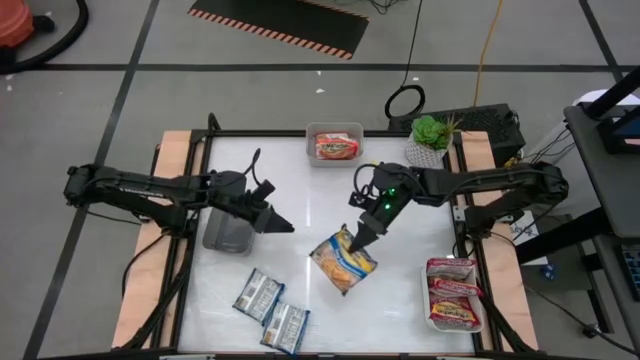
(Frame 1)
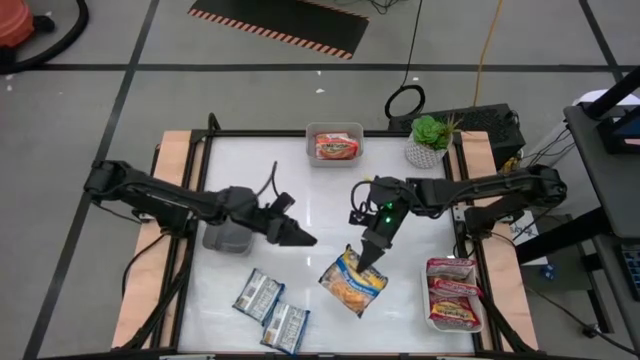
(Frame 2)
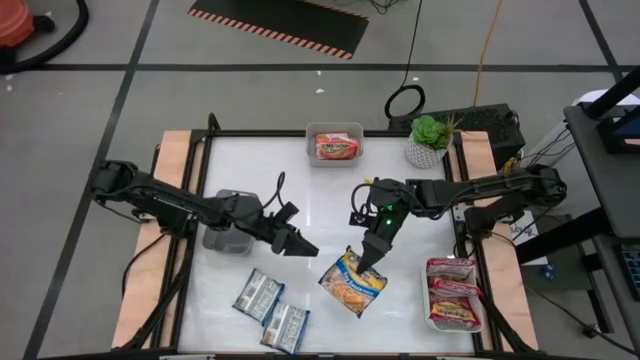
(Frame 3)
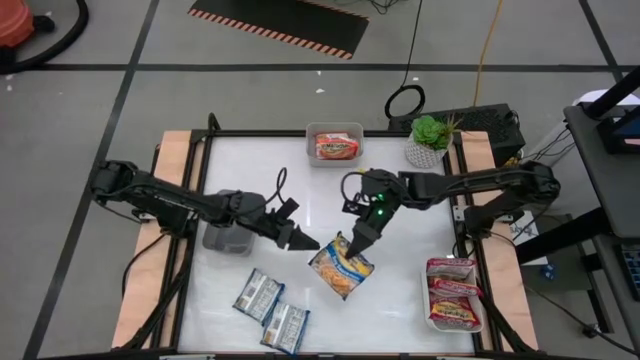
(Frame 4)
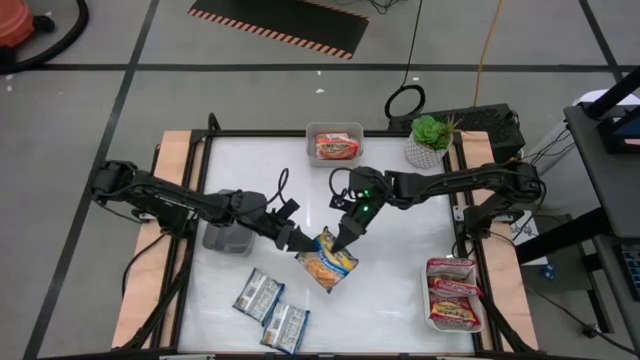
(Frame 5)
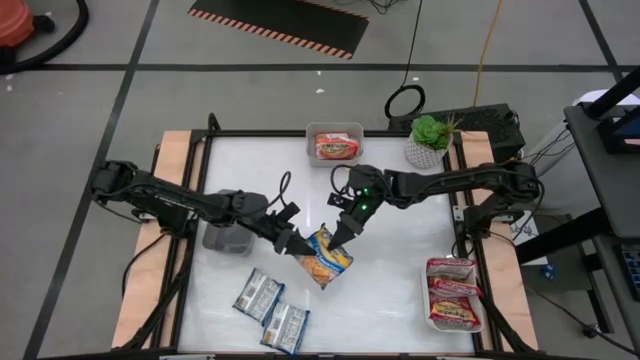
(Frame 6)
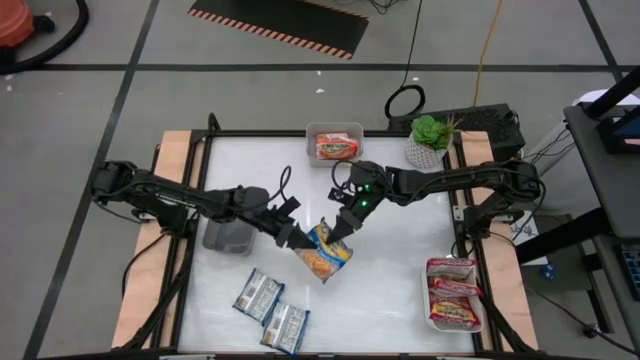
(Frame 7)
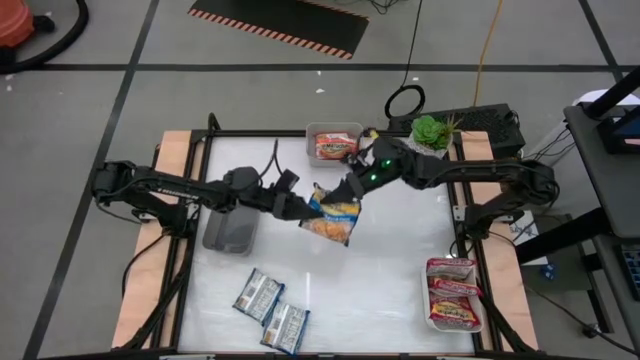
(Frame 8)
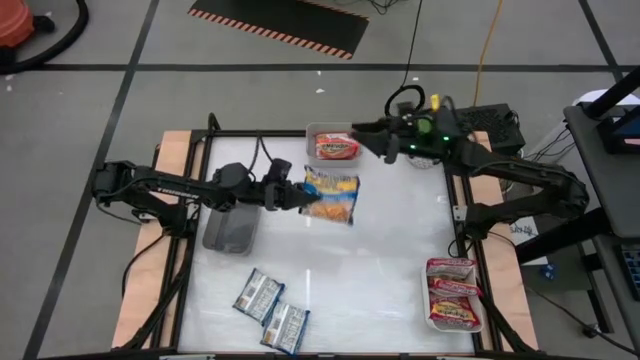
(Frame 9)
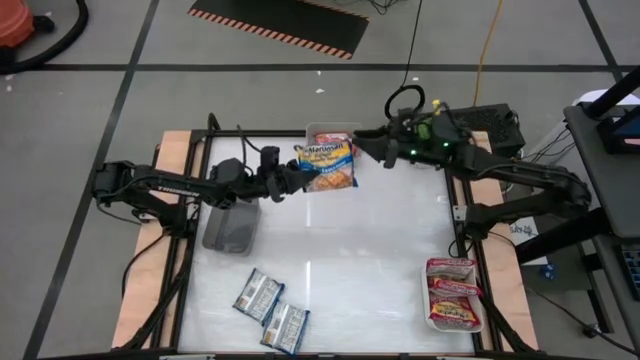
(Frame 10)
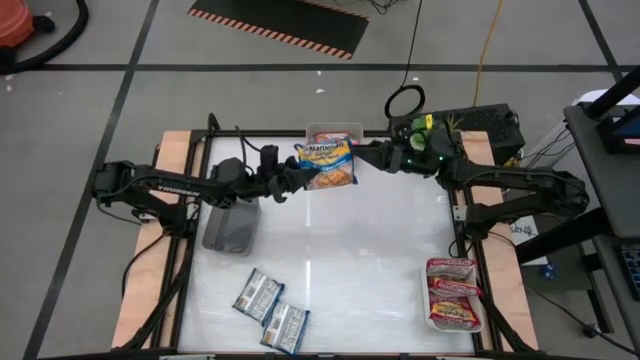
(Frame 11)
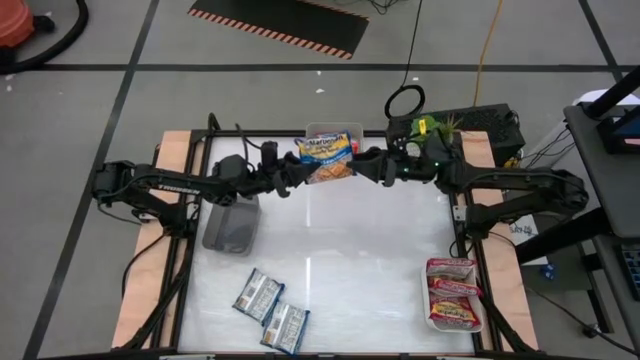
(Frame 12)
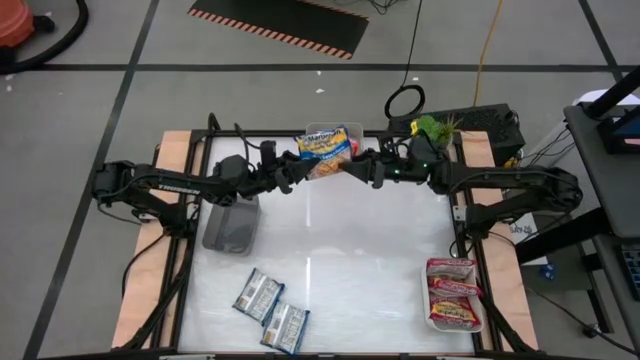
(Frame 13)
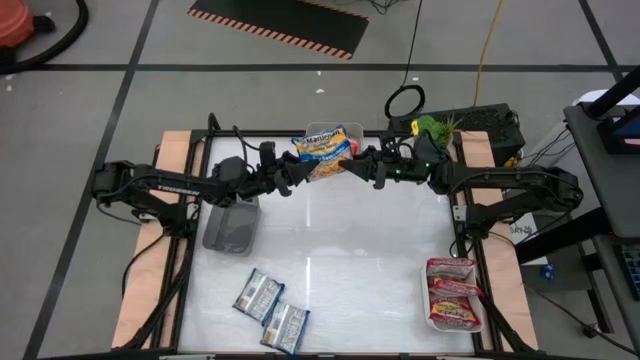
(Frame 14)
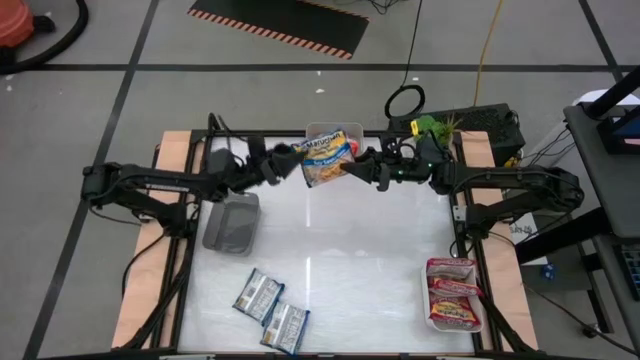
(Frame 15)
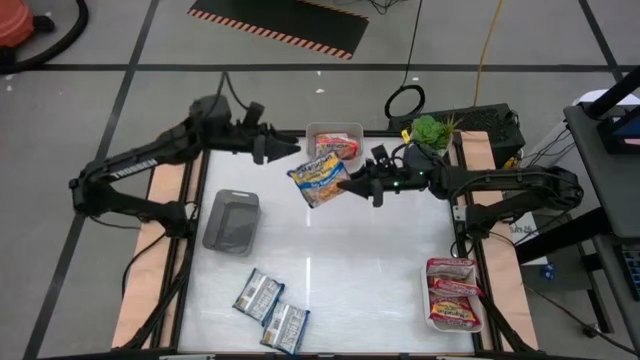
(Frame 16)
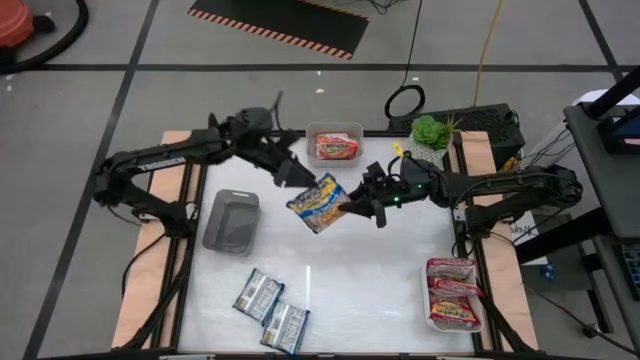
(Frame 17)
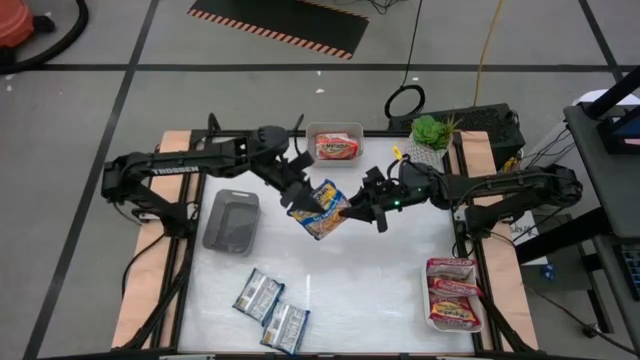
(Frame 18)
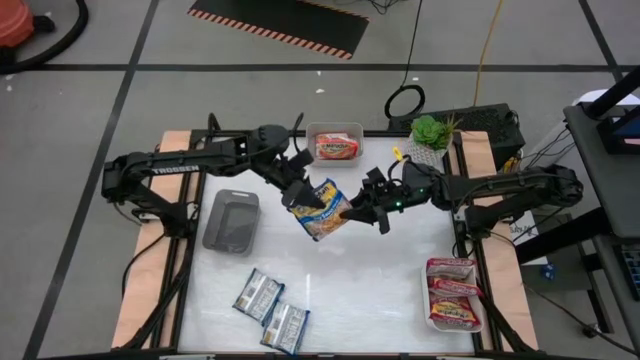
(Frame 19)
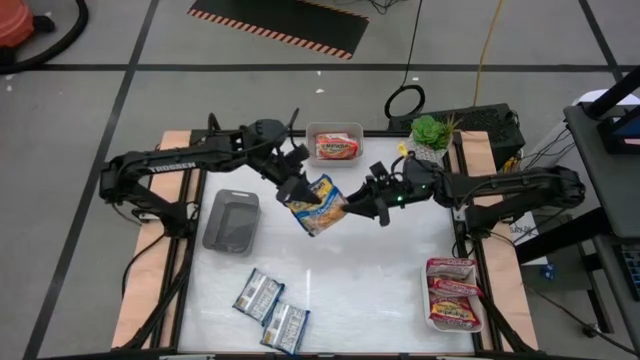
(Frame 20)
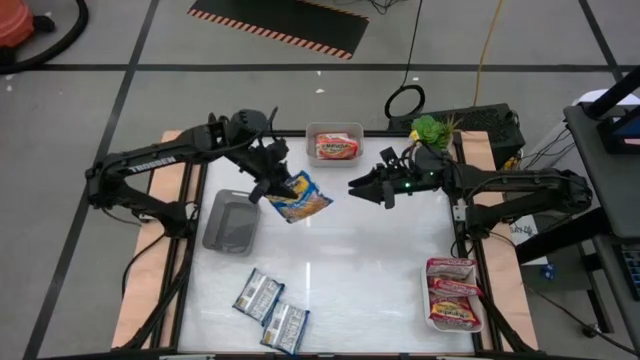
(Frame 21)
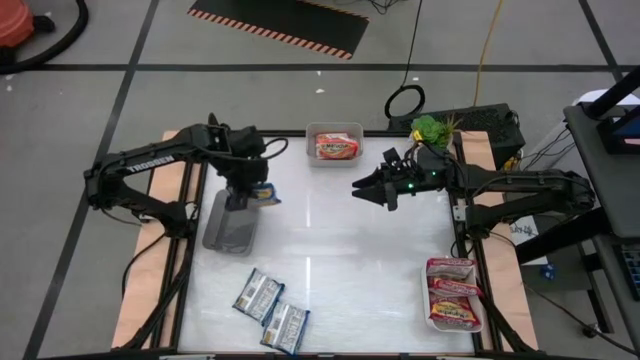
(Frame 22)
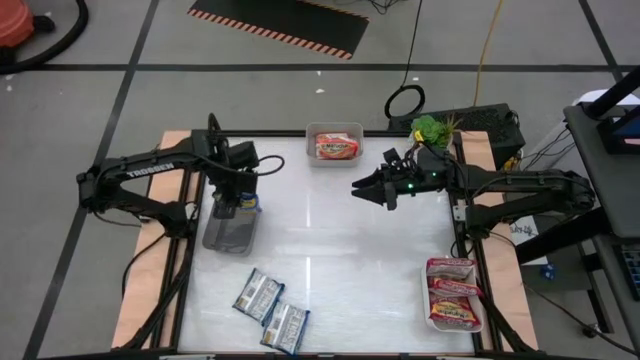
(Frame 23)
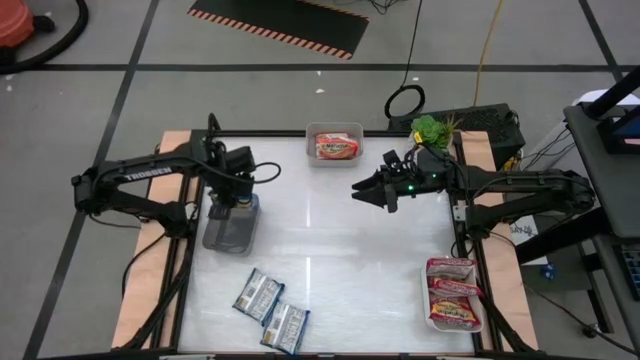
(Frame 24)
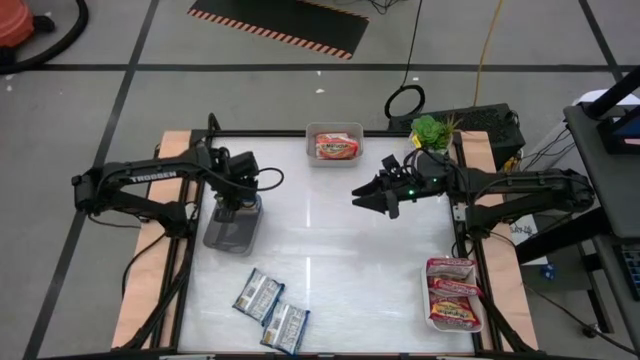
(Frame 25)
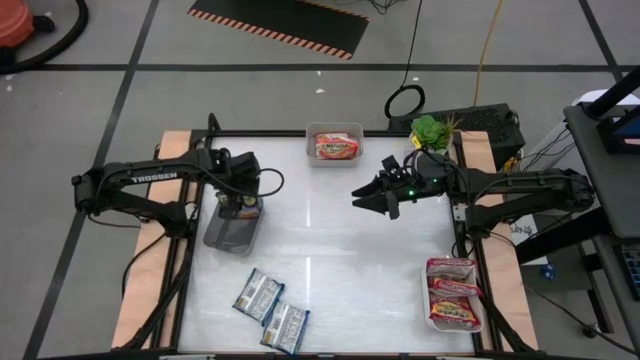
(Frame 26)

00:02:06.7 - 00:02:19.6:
Task: Sort Maruchan noodles
Put the top blue noodle pack into the black bin

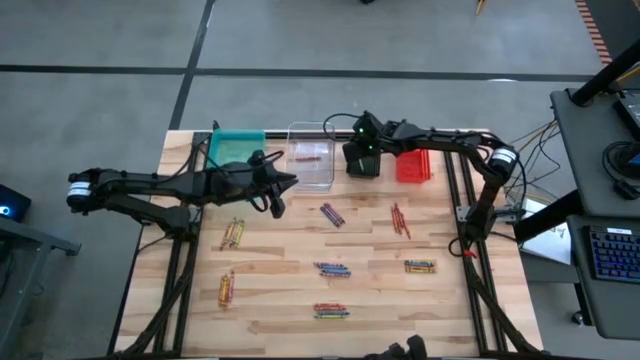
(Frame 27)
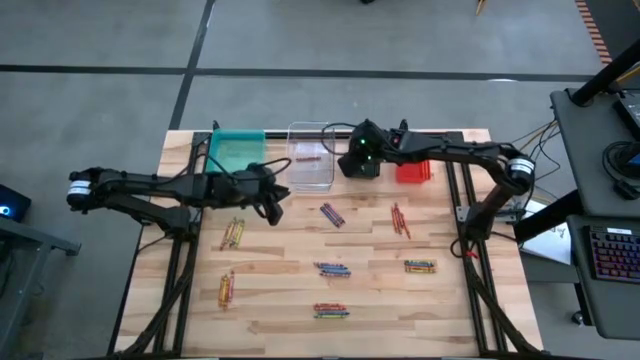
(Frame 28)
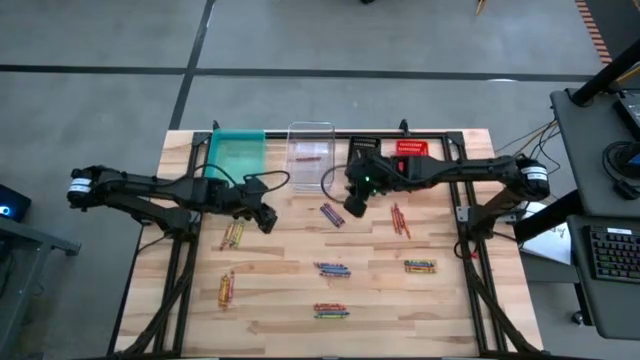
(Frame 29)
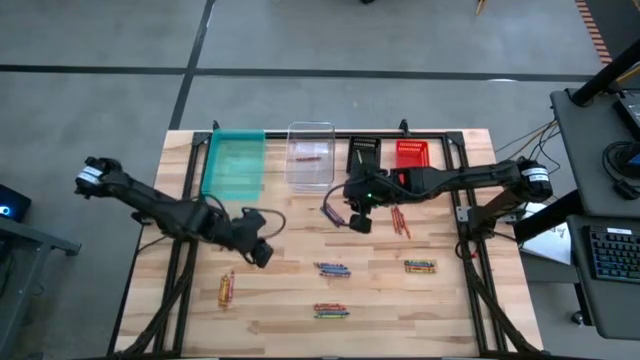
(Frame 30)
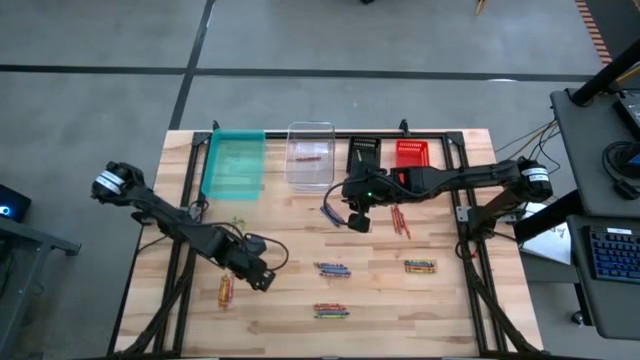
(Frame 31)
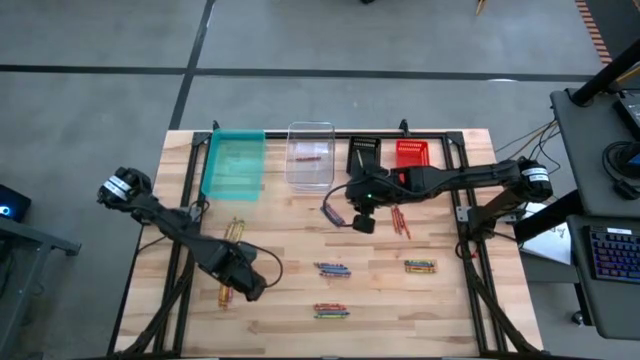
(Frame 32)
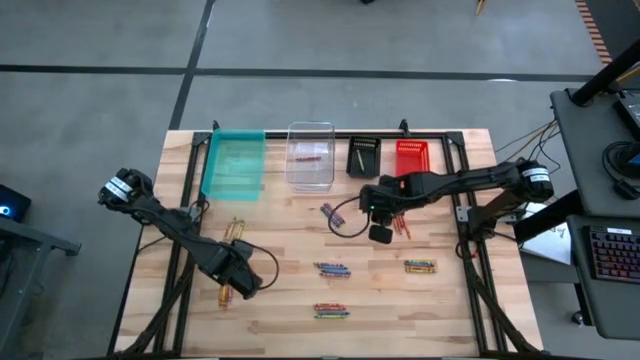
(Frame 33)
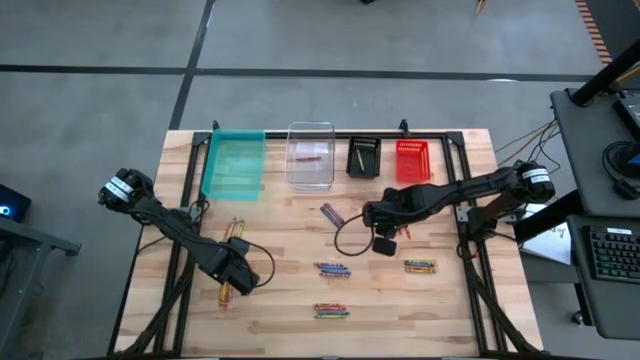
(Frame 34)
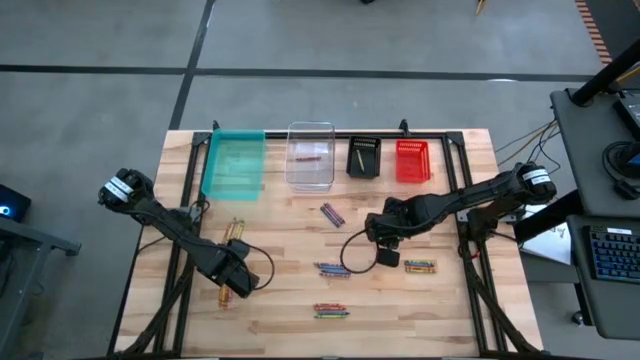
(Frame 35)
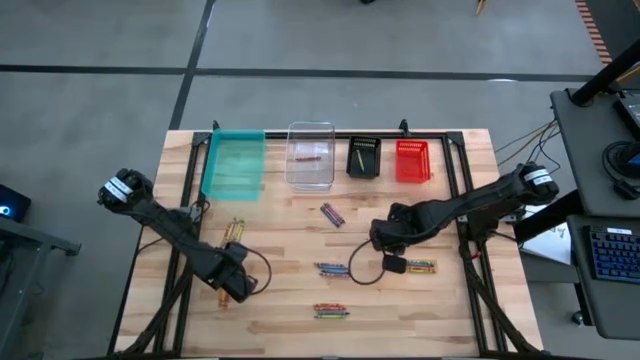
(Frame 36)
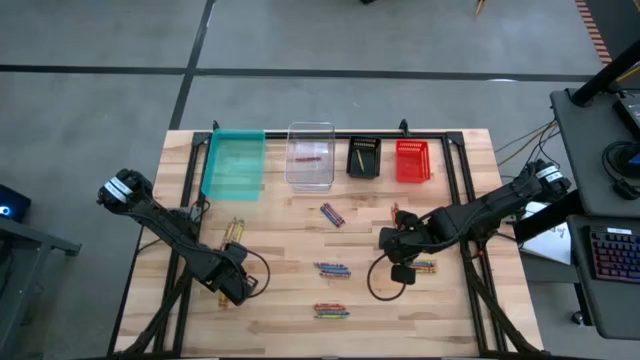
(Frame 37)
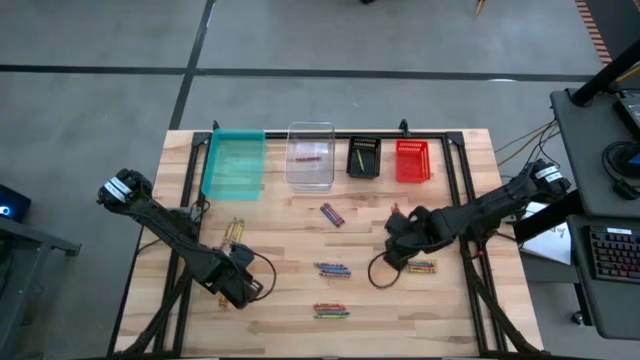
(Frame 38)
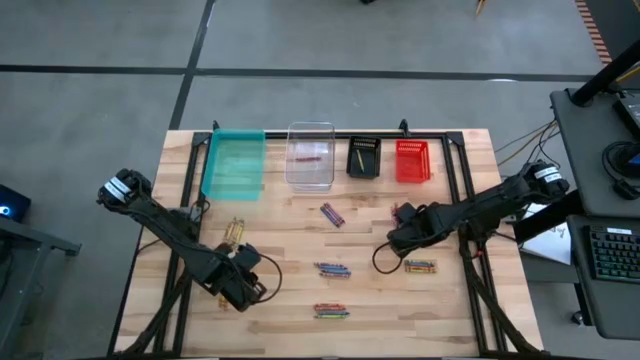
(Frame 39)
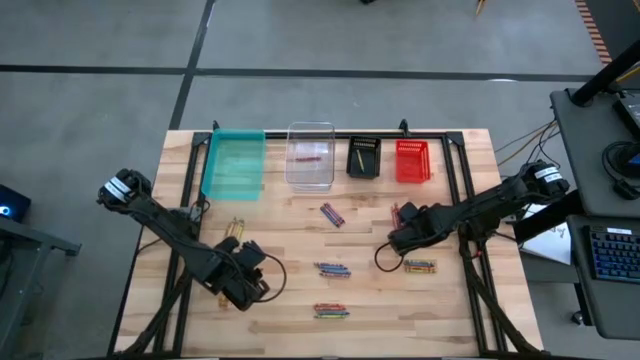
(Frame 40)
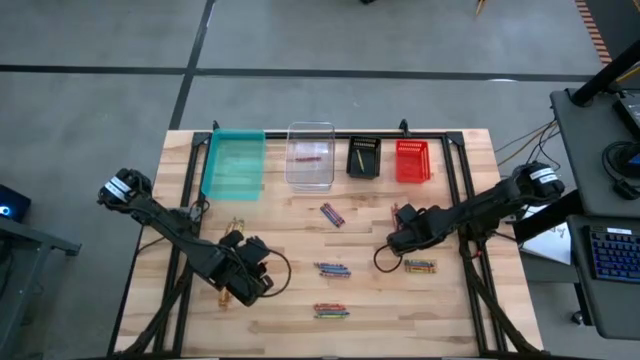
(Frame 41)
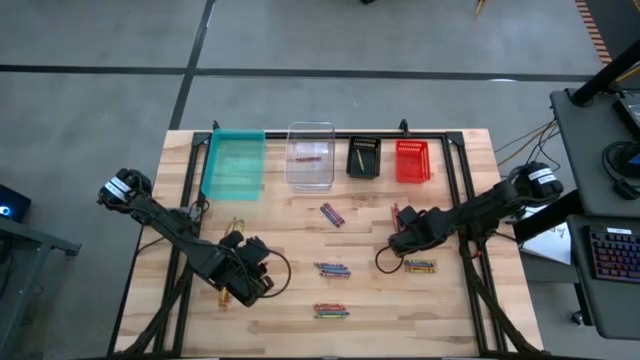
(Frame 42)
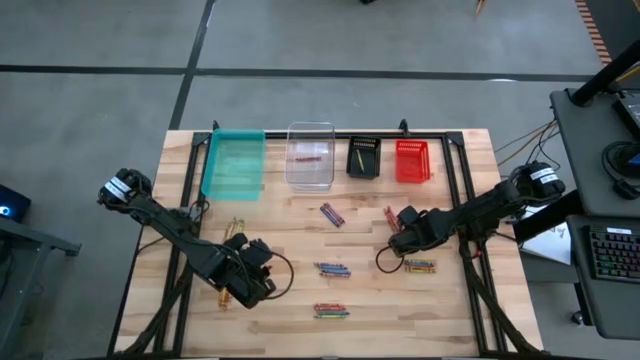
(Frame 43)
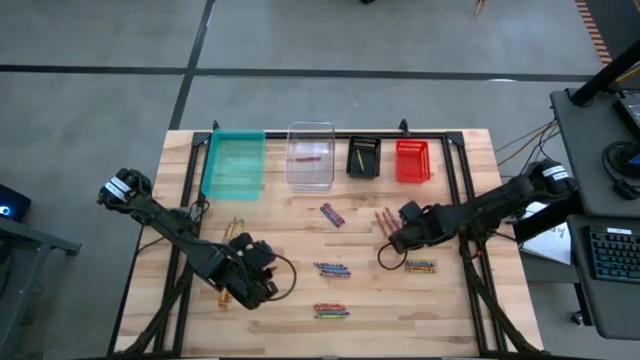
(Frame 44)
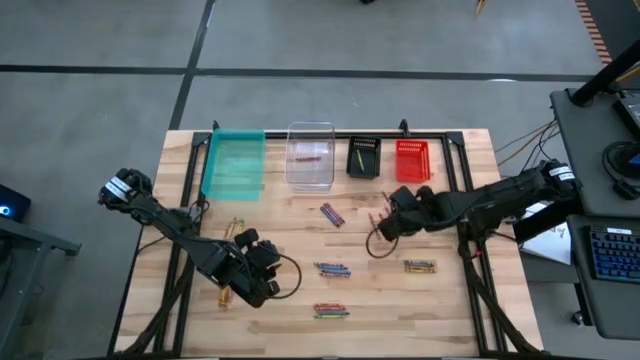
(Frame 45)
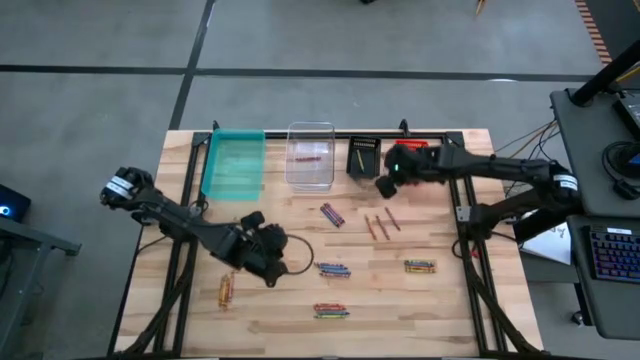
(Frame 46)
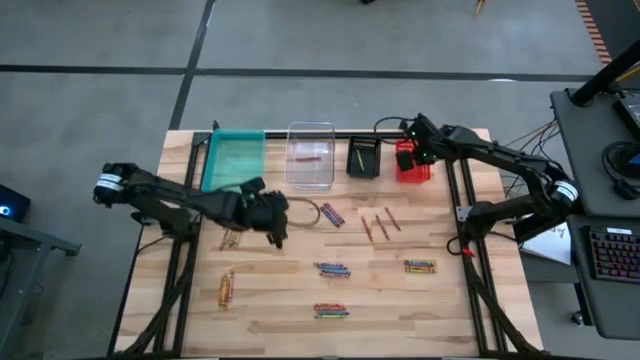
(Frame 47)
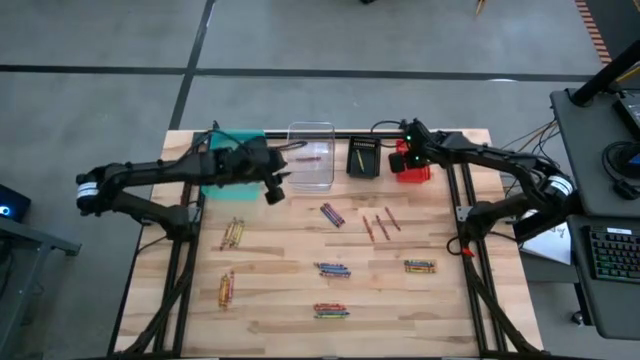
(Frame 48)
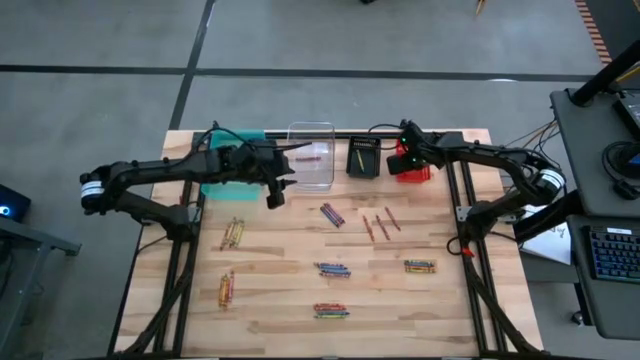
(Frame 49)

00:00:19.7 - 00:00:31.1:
Task: Sort crayons
Put the orange crayon into the orange bin
